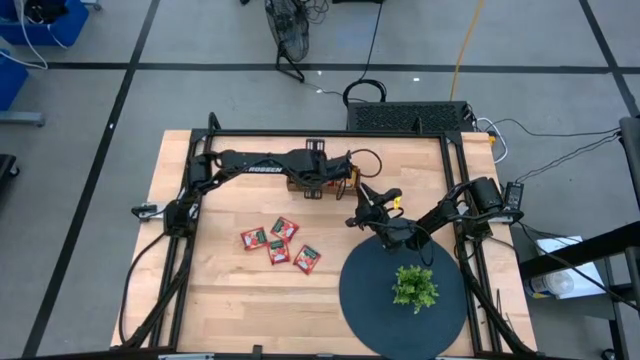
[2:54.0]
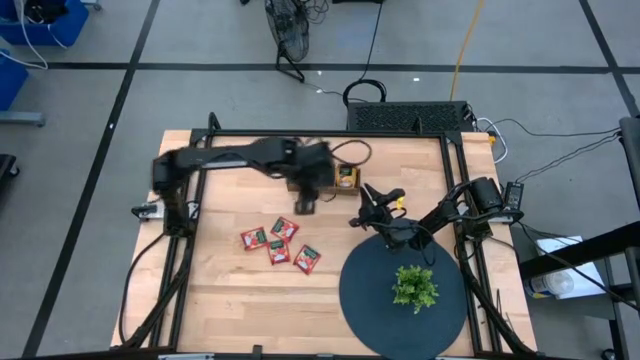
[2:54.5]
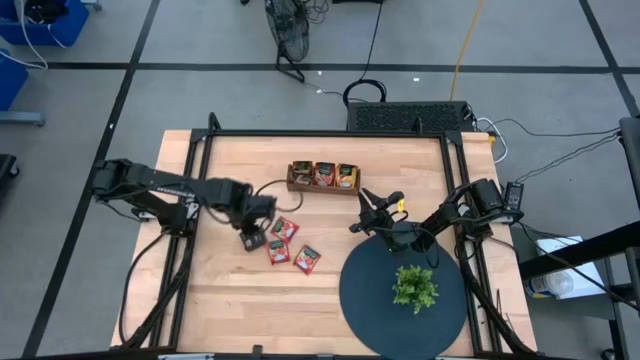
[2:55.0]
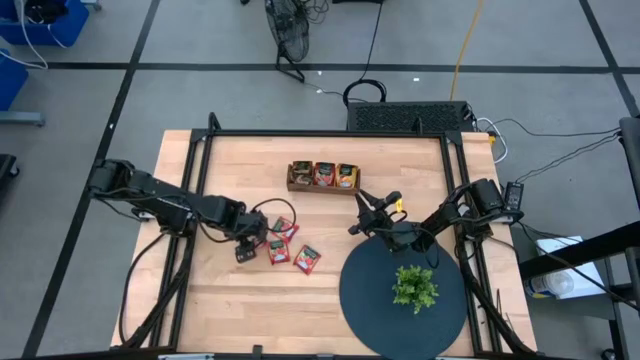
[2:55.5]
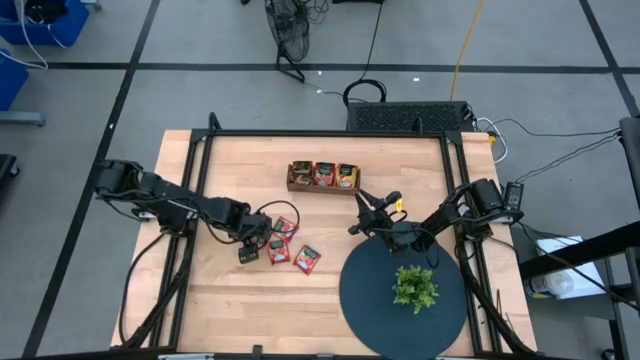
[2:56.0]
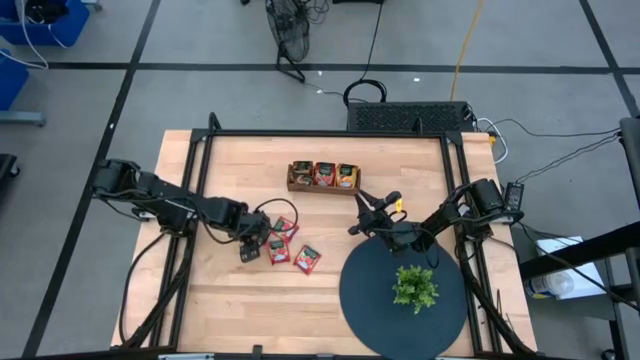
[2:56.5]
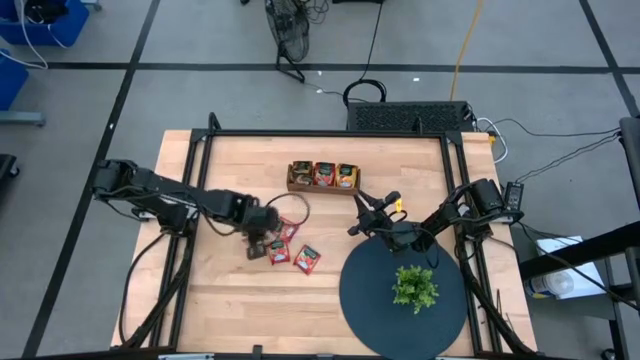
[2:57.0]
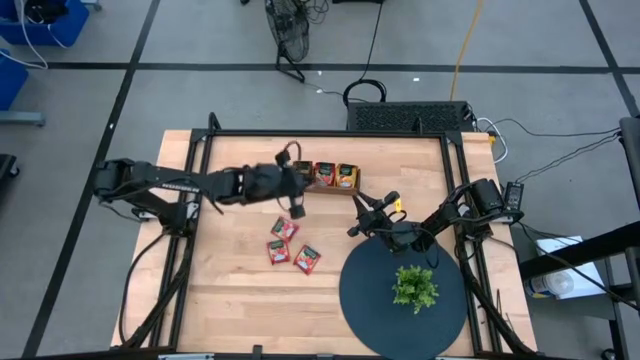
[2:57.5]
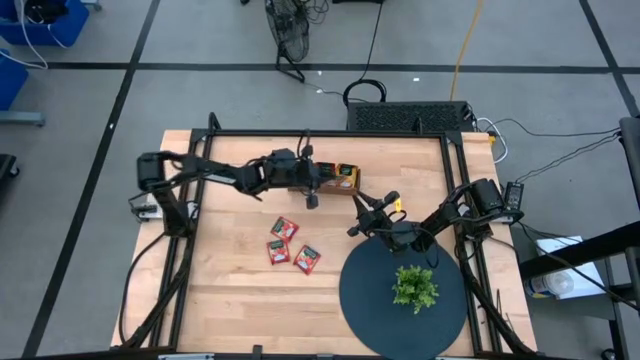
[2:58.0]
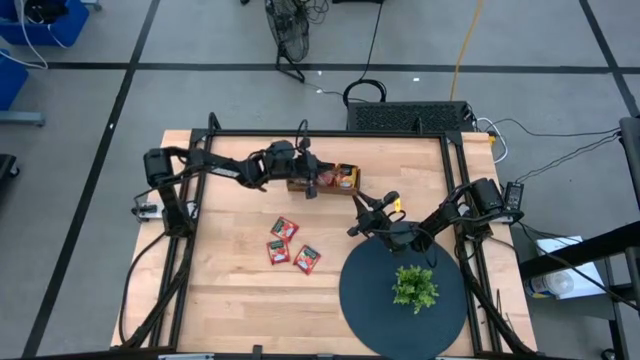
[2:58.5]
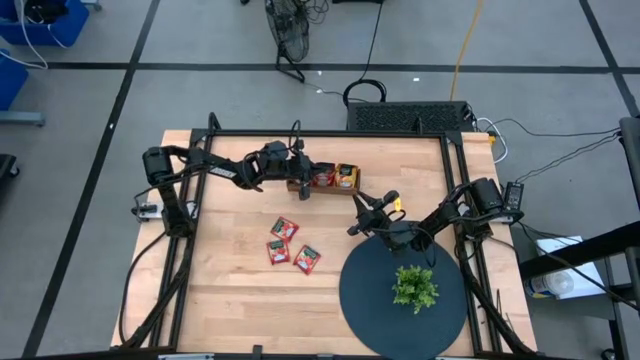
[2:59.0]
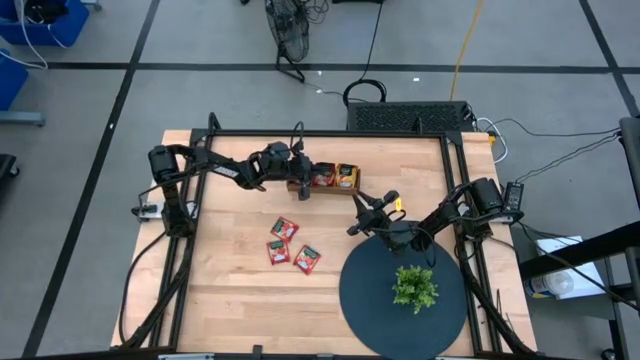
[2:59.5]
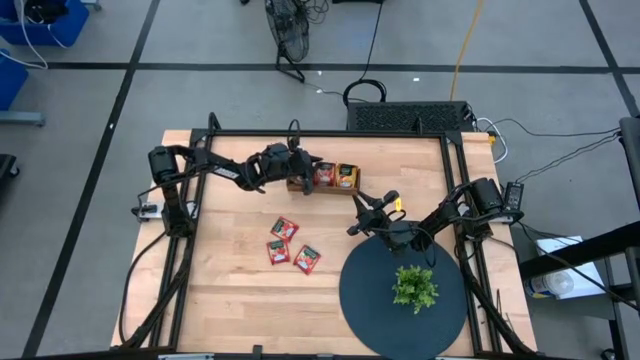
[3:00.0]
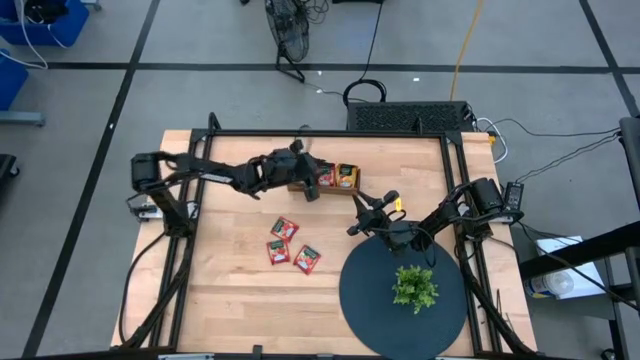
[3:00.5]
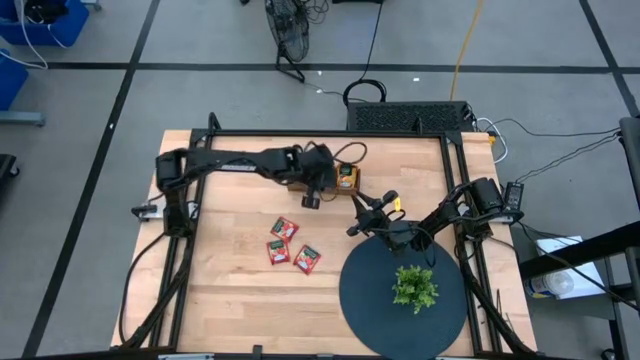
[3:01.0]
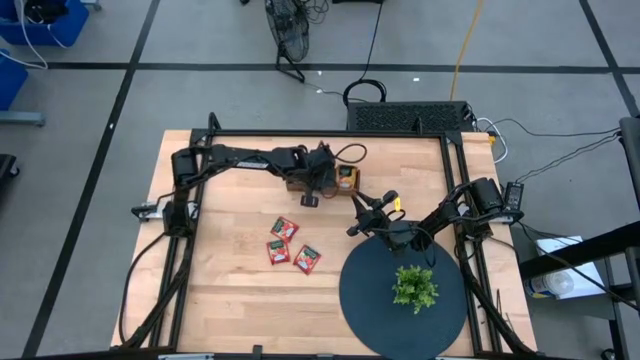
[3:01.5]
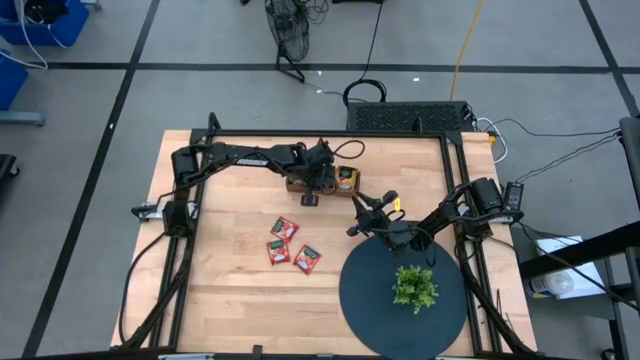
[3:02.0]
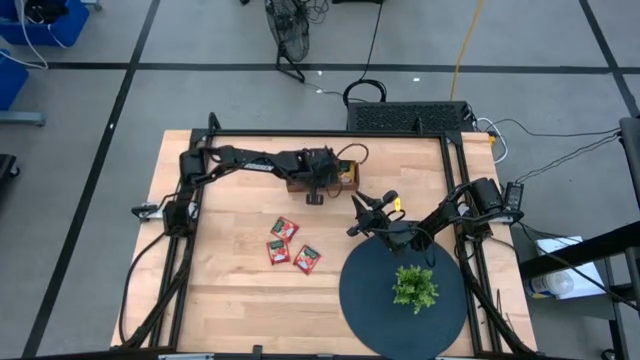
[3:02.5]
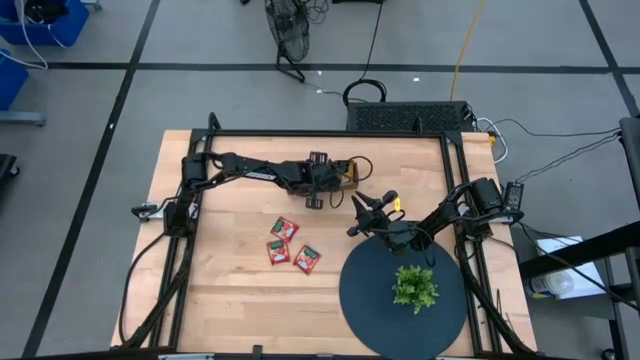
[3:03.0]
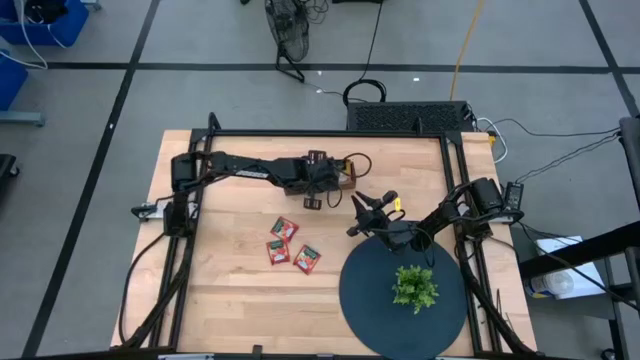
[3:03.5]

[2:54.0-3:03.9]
Task: Pick & Place Tea
Put the red tea bag into the middle section wooden organizer

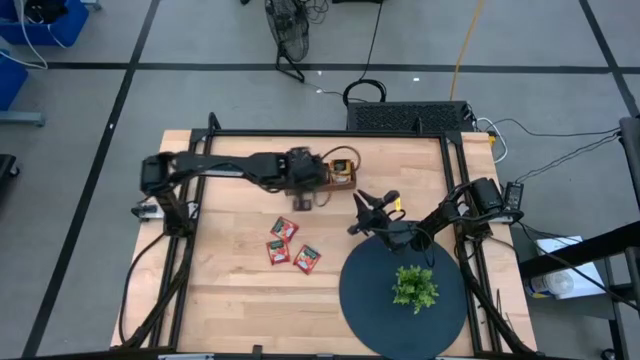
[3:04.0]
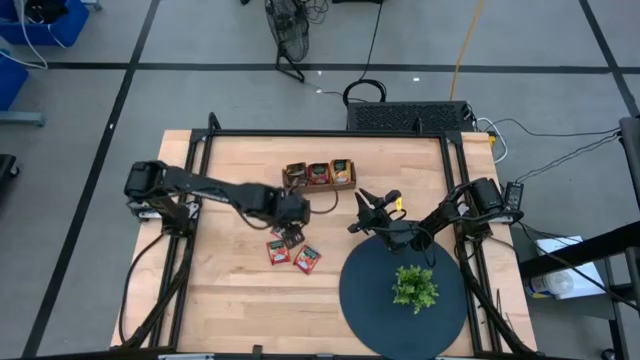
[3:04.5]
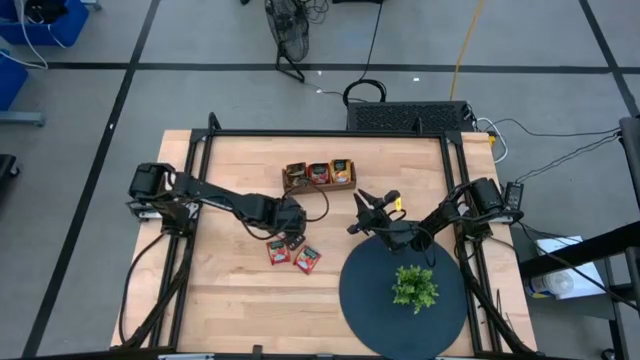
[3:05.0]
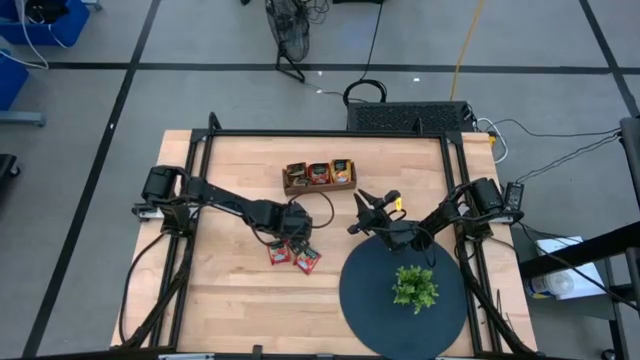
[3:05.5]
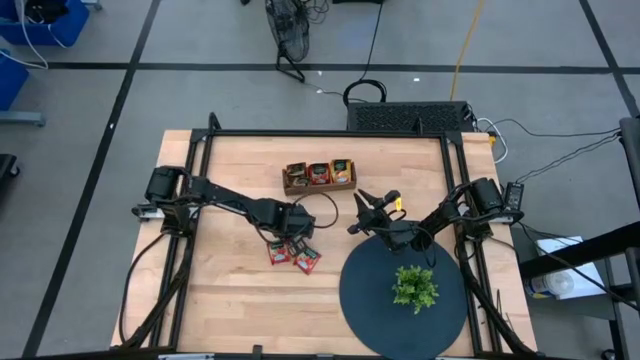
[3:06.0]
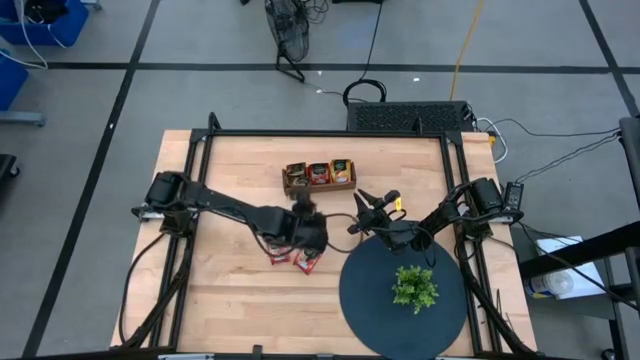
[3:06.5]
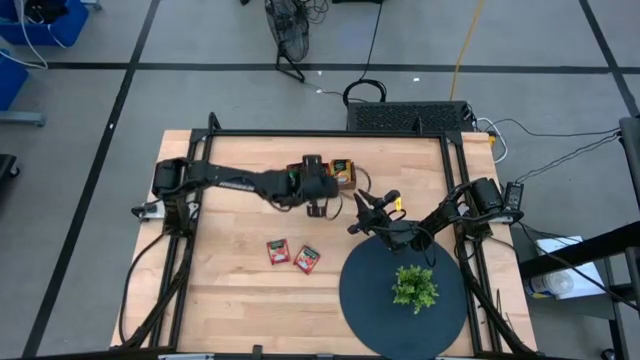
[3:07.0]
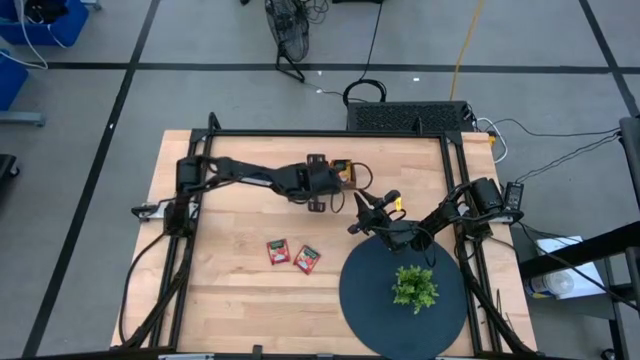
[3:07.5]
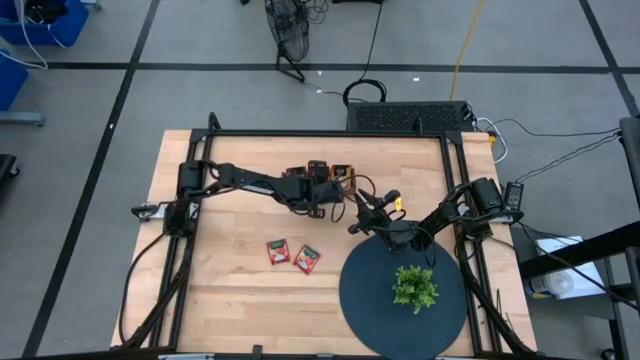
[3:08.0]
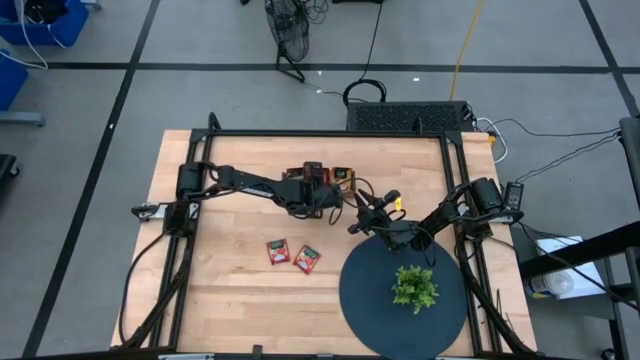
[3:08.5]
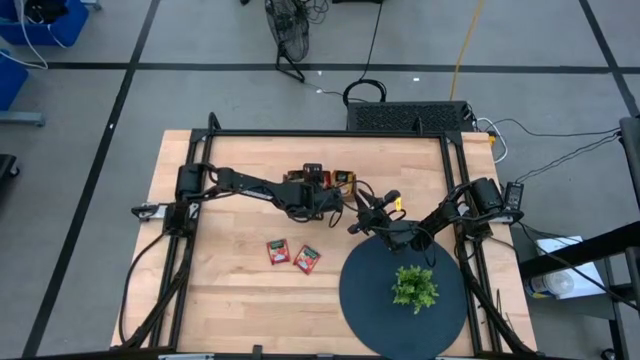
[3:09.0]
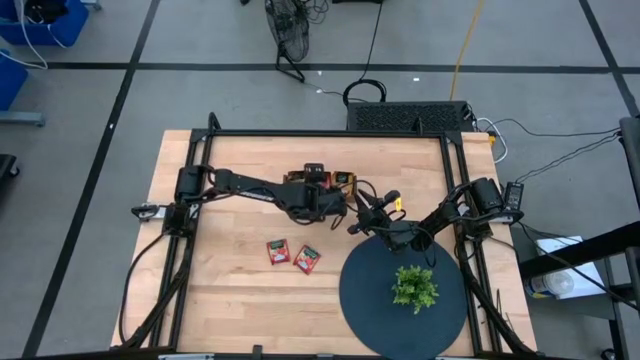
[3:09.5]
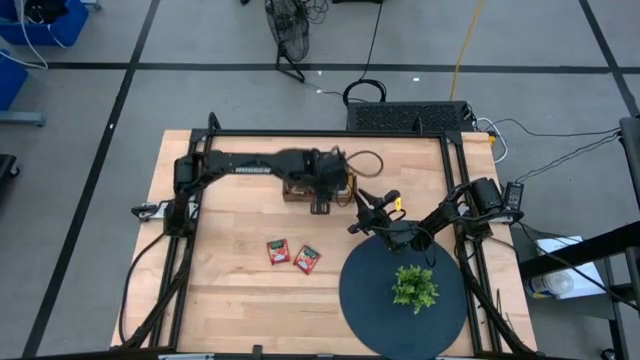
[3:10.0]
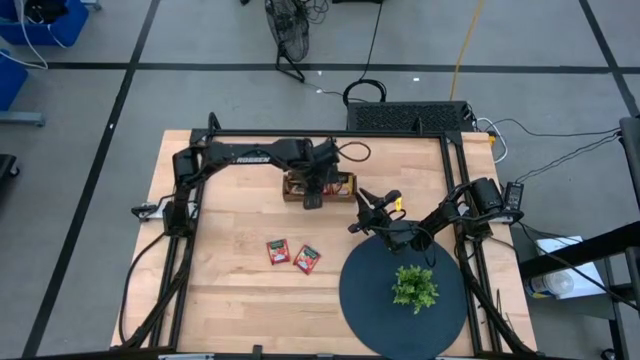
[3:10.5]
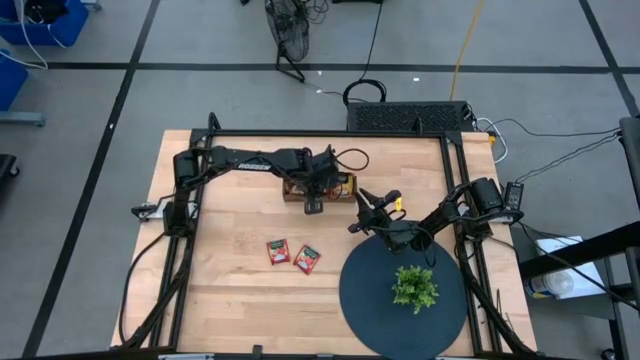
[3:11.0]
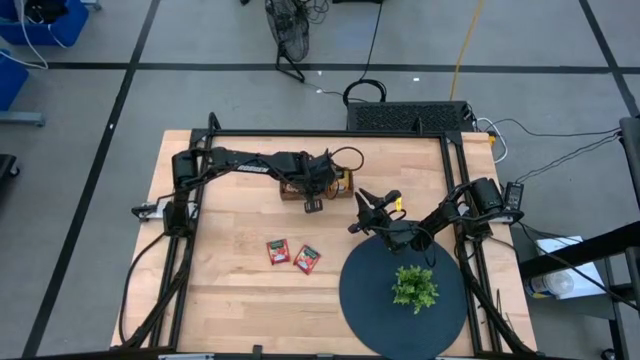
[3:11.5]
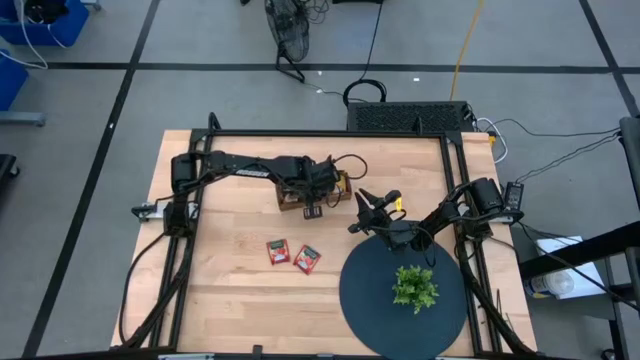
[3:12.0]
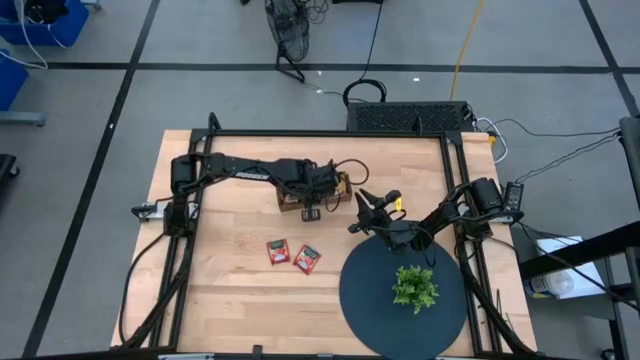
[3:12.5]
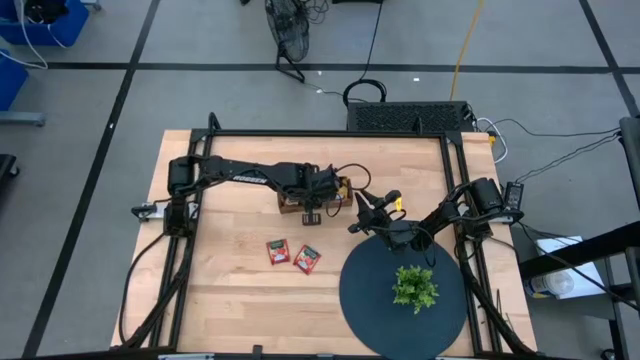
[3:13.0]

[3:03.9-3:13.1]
Put the red tea bag into the middle section wooden organizer

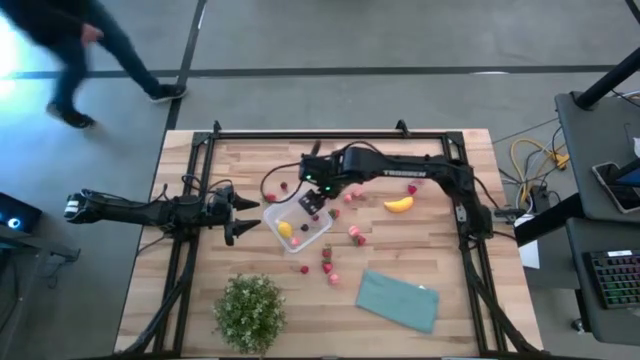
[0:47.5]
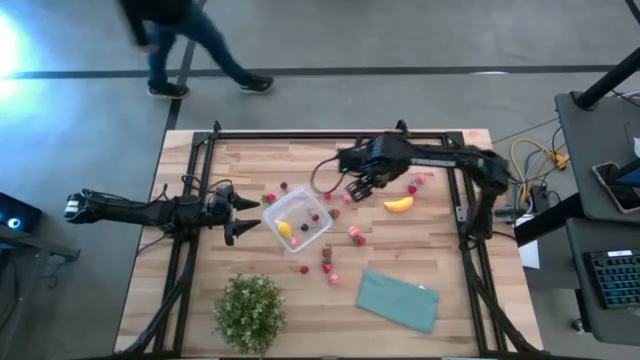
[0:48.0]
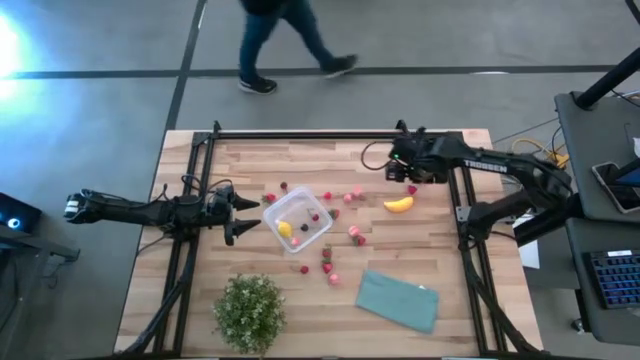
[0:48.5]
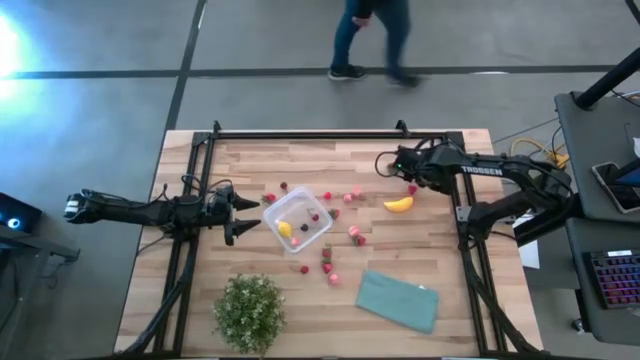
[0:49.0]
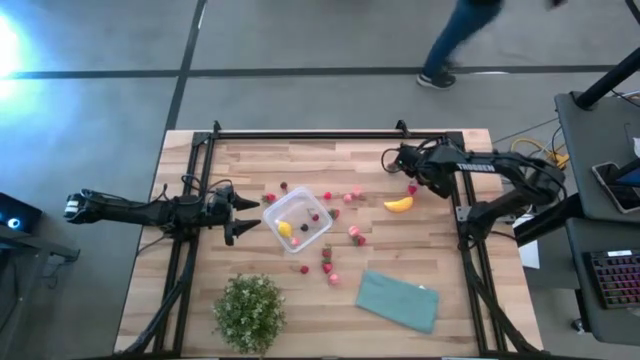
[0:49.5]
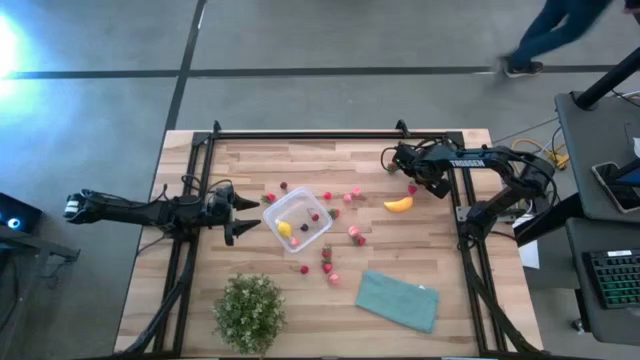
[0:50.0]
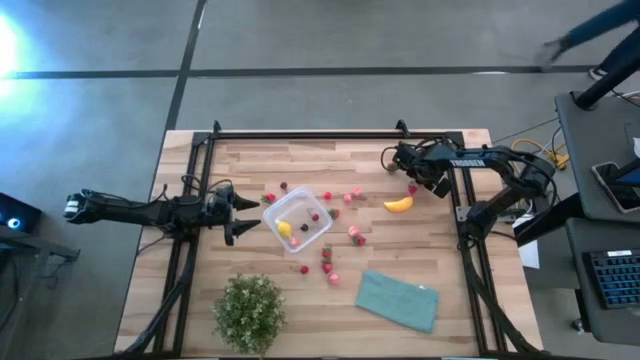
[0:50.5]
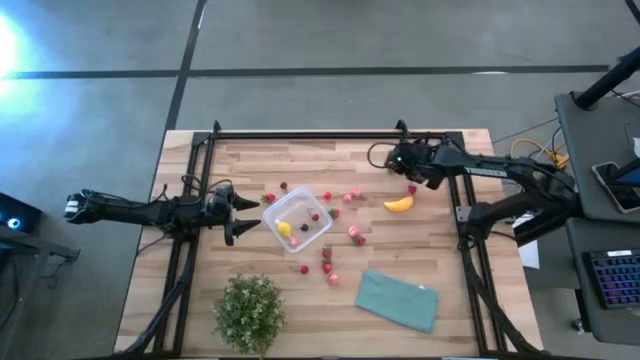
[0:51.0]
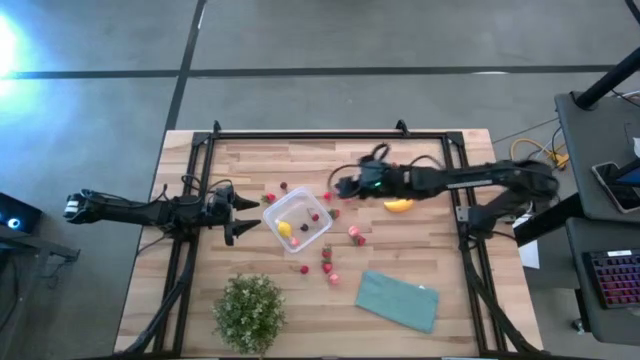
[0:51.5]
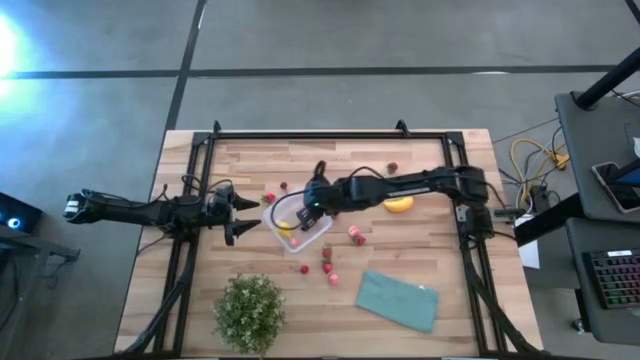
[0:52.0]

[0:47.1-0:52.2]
Task: Pick and placing Produce into tupperware
Put the pink peach into the transparent bin
